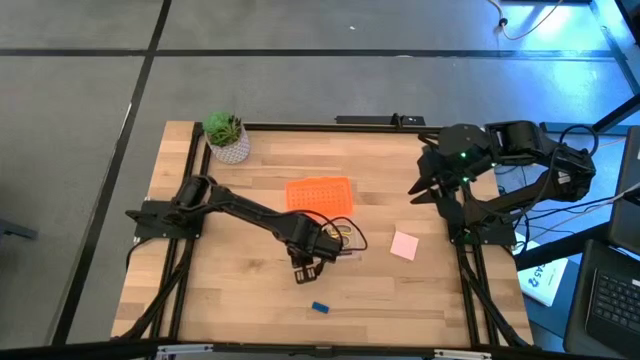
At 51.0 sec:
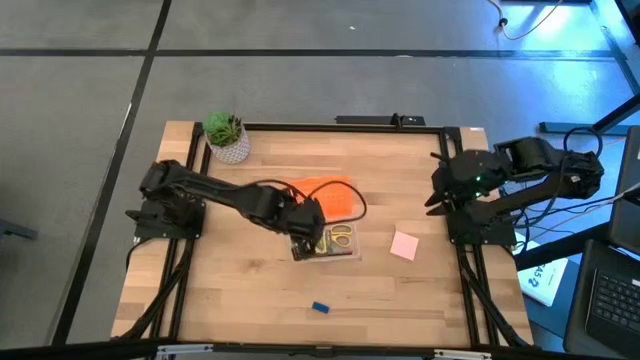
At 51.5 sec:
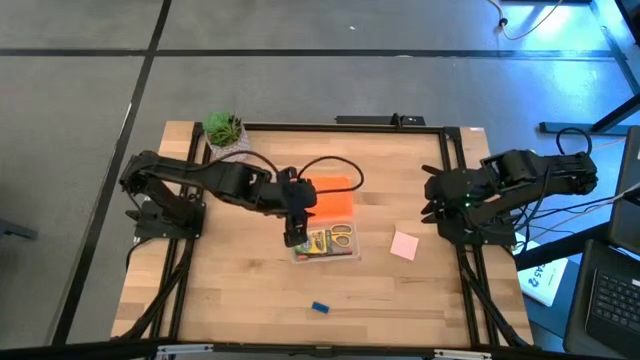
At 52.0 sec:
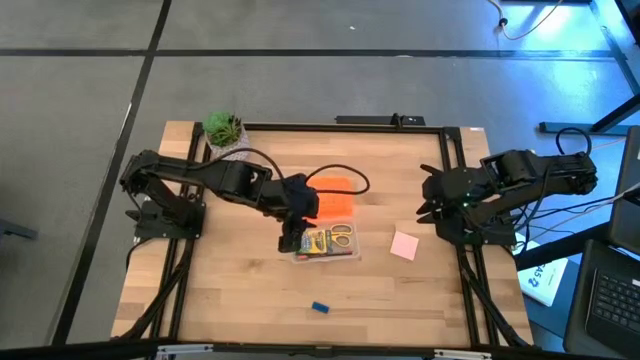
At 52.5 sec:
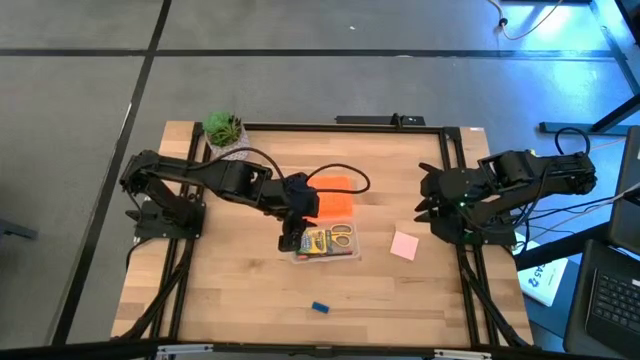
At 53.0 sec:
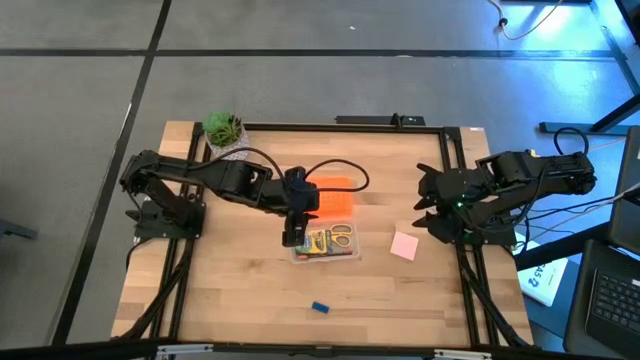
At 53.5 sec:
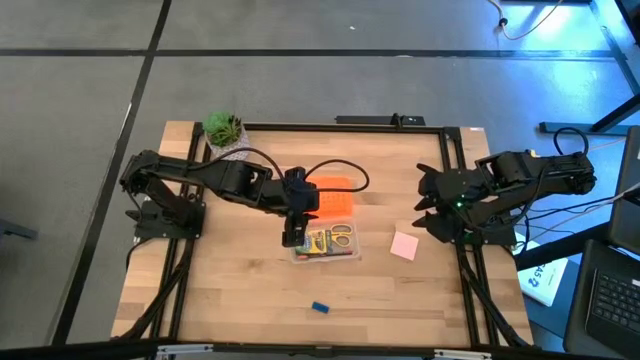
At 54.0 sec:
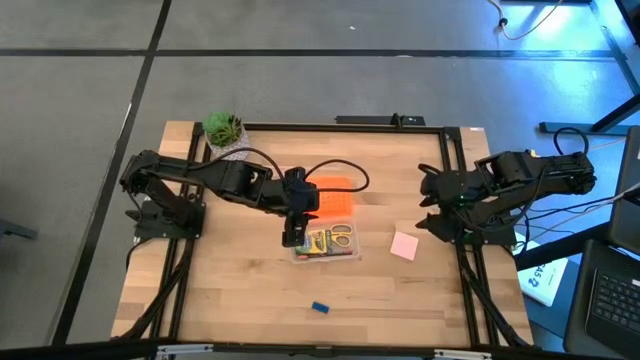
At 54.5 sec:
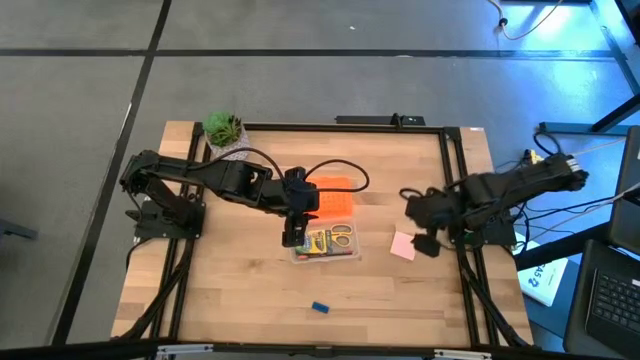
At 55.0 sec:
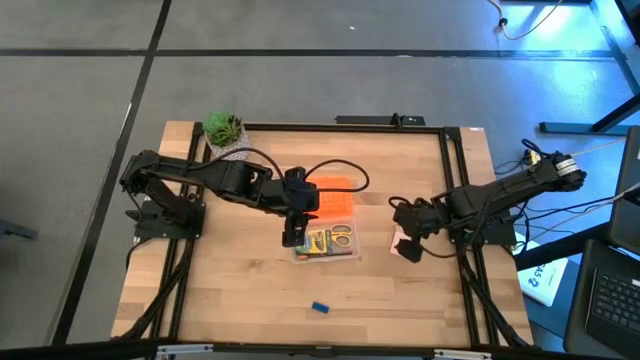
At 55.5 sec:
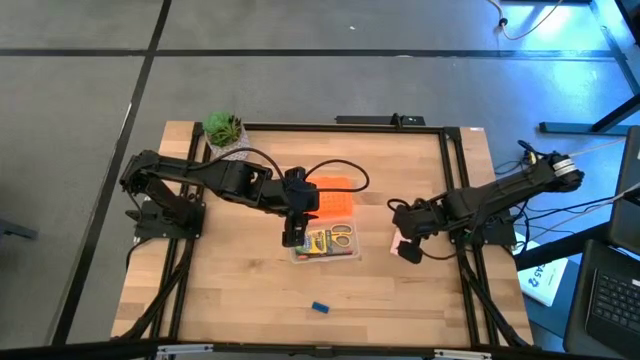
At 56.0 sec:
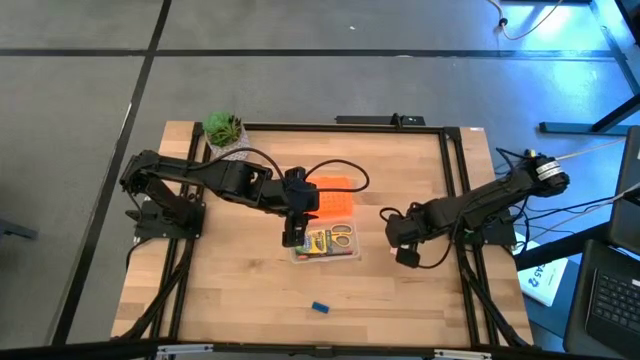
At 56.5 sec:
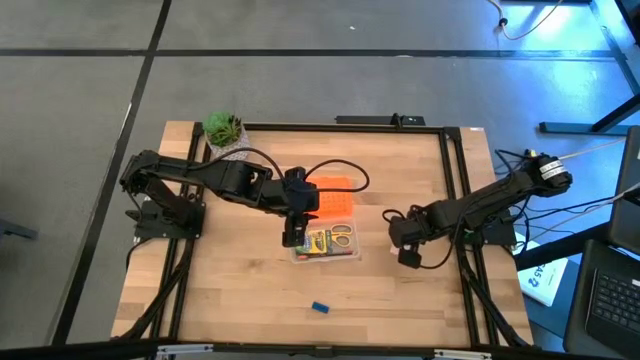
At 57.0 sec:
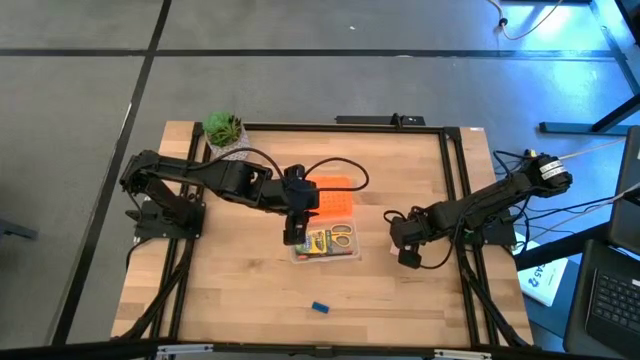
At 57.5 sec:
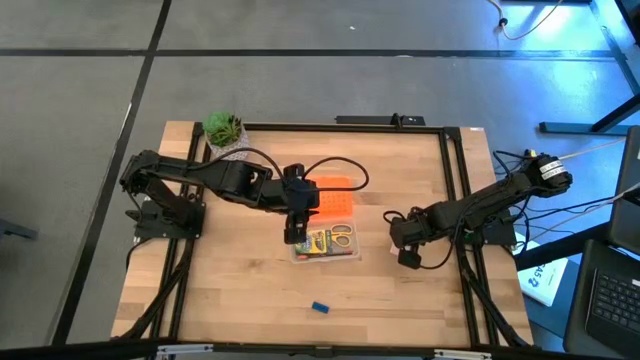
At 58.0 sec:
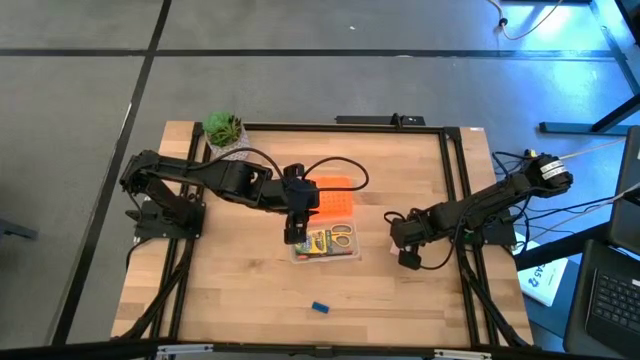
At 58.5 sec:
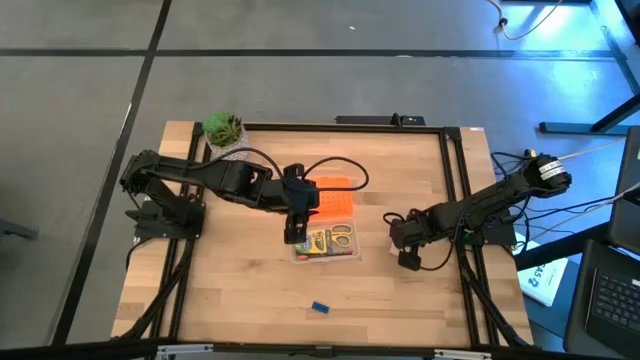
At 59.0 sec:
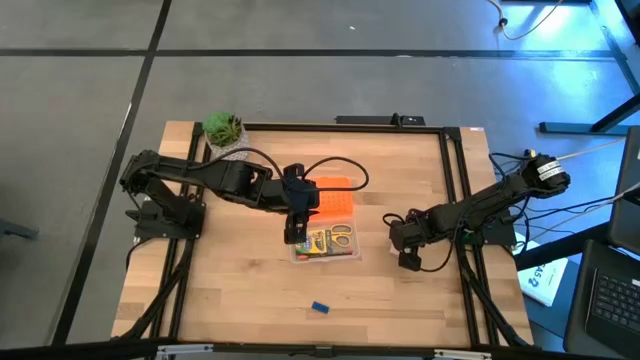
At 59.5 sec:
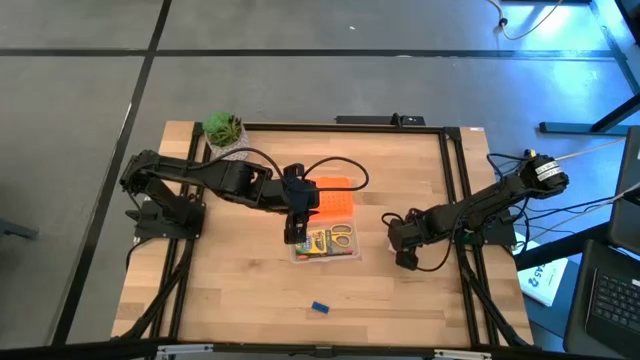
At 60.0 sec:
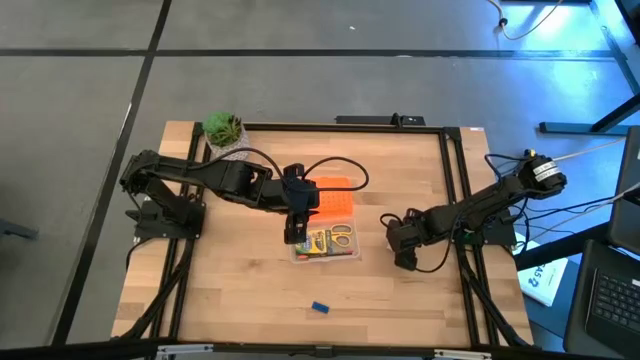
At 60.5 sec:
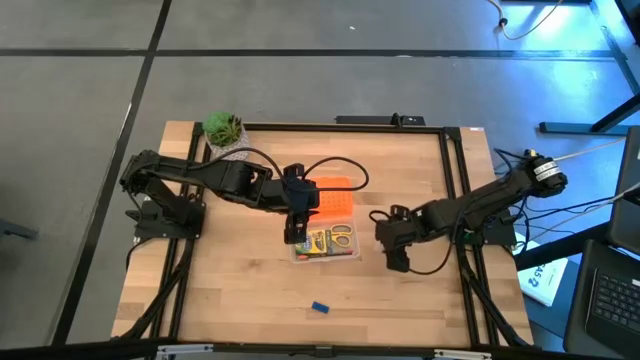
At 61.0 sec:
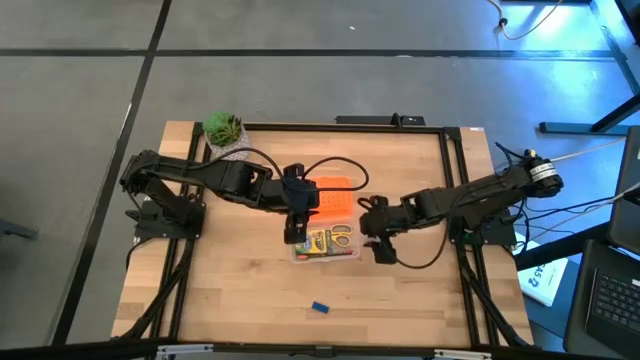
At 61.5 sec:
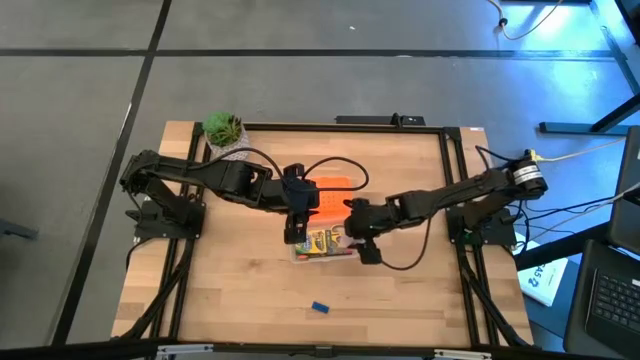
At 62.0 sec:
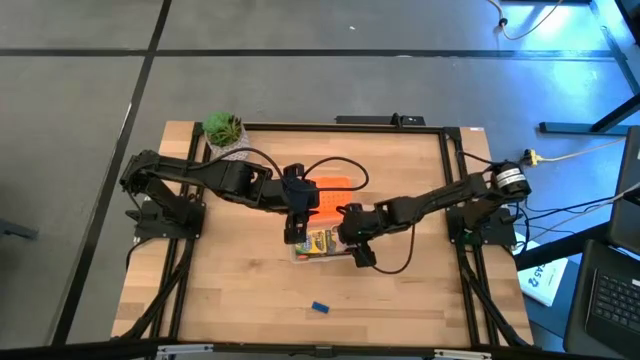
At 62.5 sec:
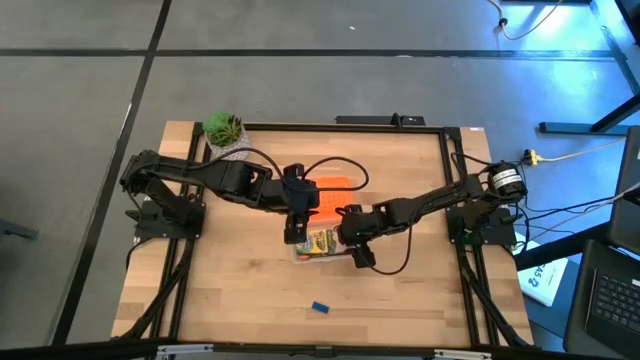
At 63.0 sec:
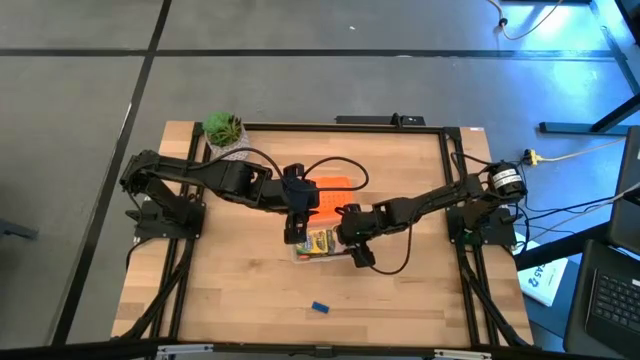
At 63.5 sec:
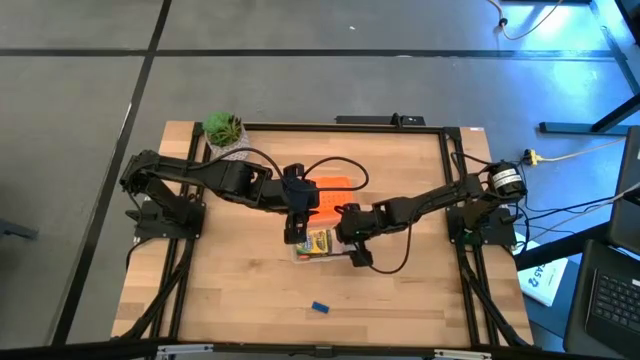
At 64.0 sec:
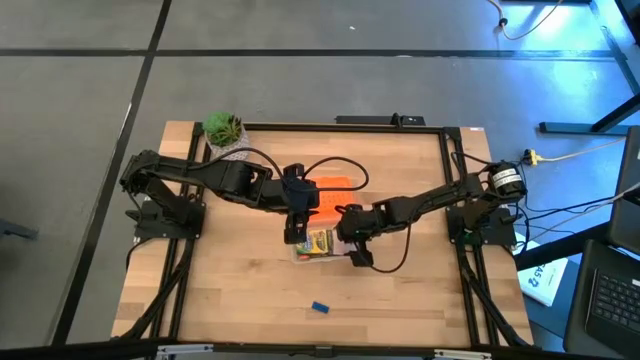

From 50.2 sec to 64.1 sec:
Task: Pack school essentials
Put the pink sticky notes into the supply box

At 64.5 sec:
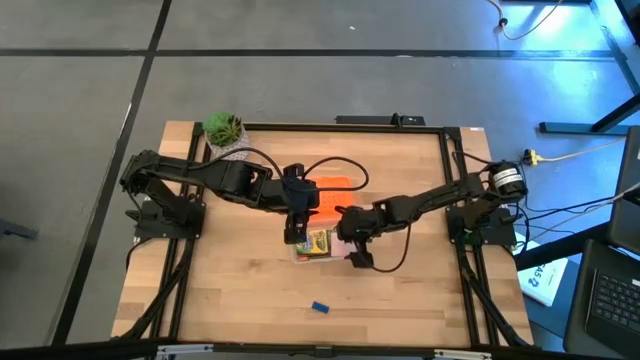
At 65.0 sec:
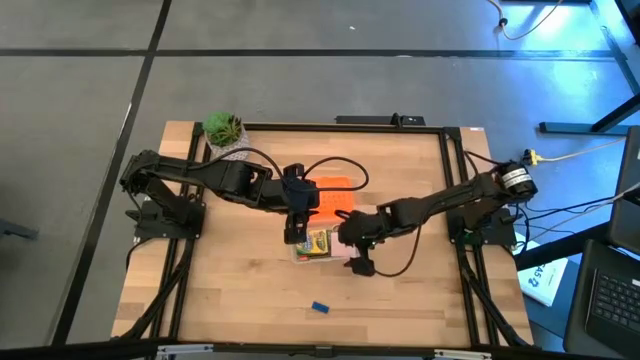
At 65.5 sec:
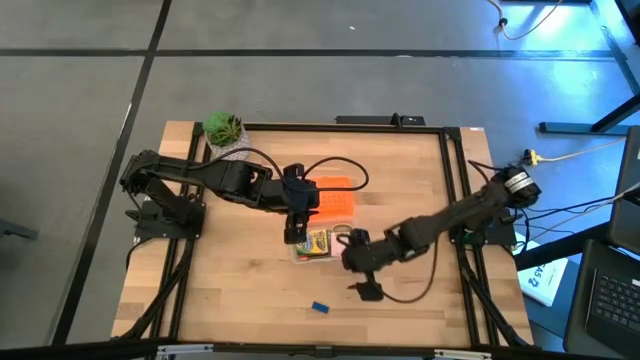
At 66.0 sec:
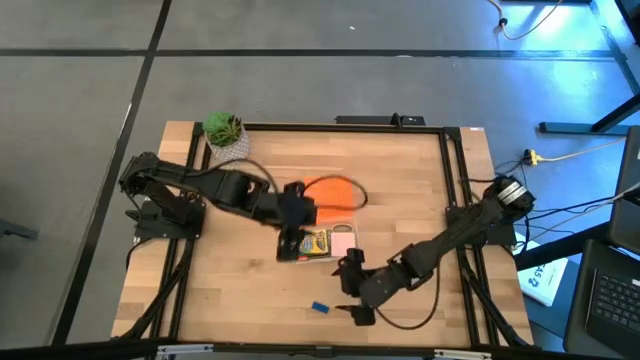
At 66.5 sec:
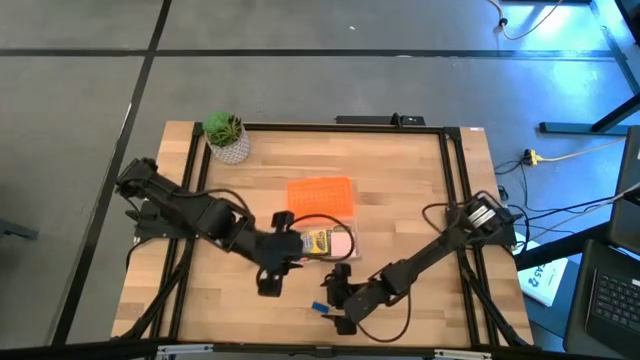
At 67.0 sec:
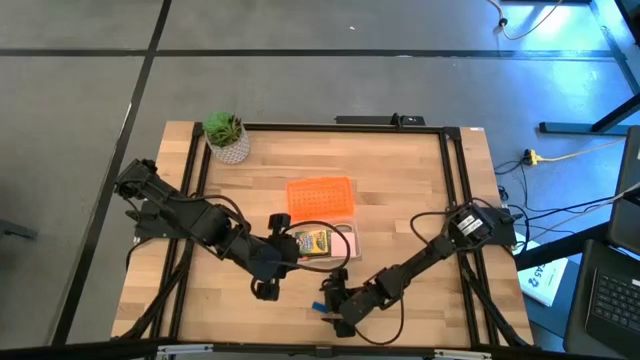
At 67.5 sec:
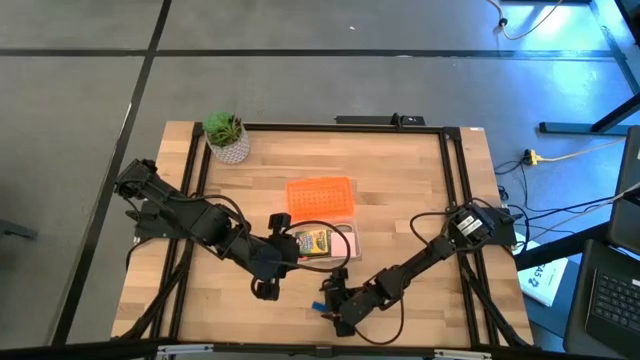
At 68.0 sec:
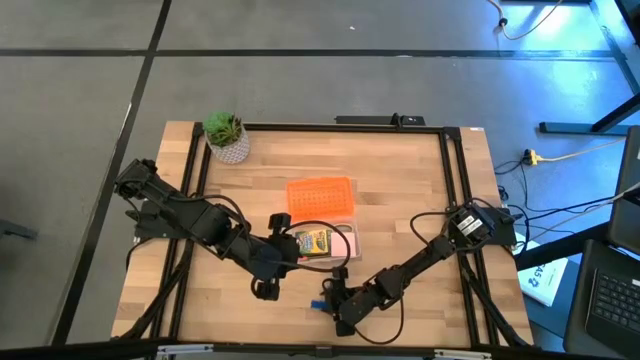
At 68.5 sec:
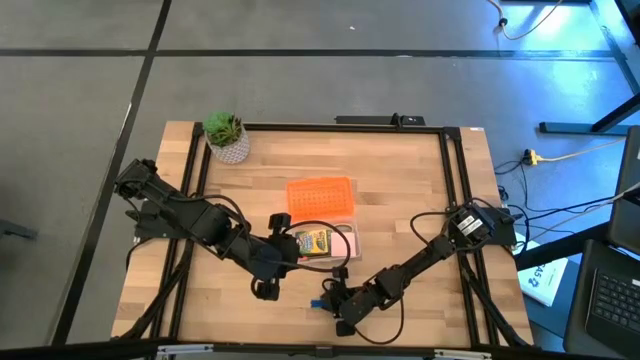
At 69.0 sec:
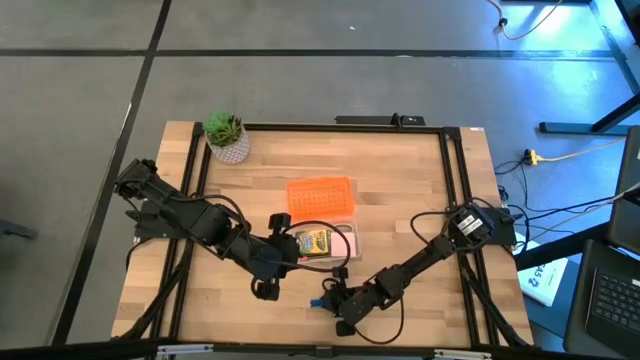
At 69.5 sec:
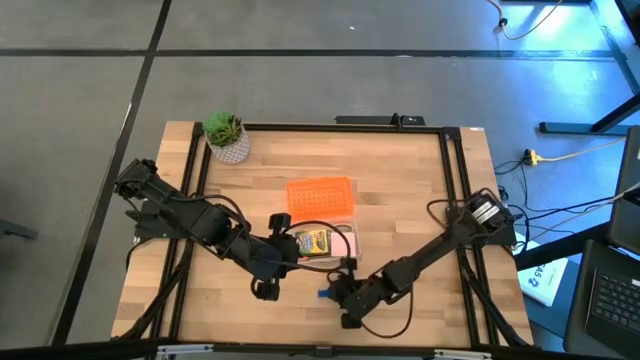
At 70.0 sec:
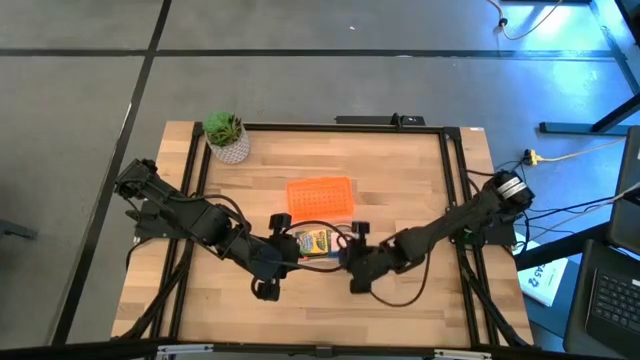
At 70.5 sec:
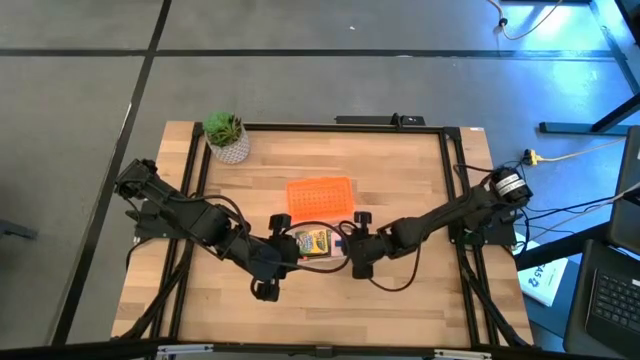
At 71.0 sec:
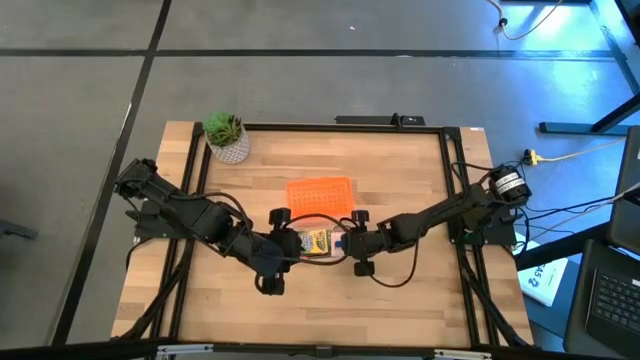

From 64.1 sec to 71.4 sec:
Put the blue eraser into the supply box
